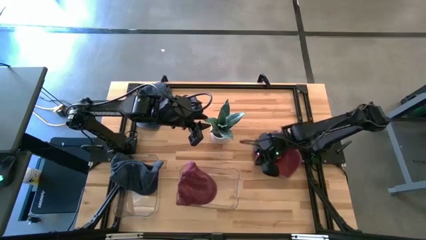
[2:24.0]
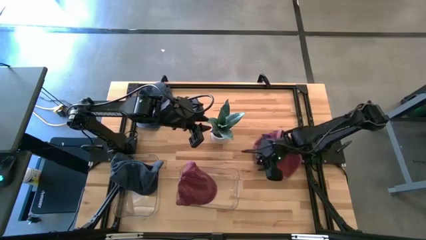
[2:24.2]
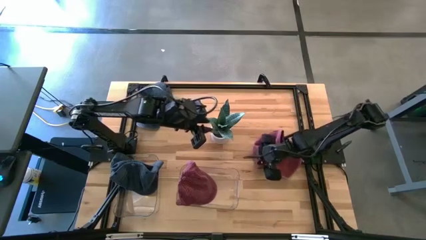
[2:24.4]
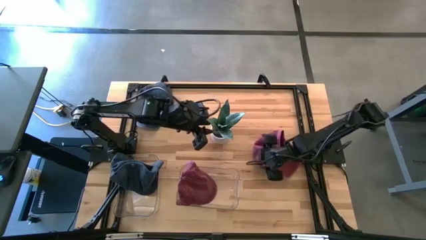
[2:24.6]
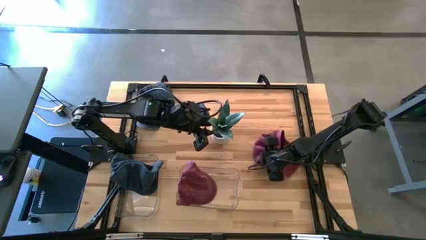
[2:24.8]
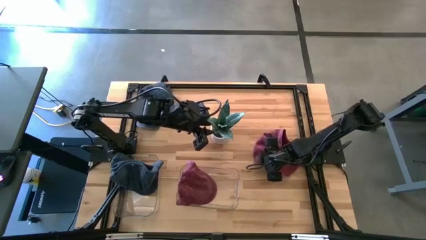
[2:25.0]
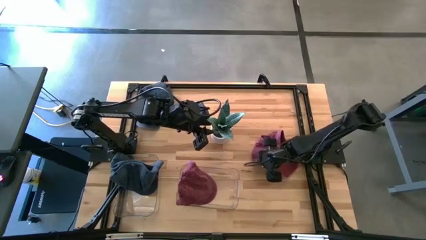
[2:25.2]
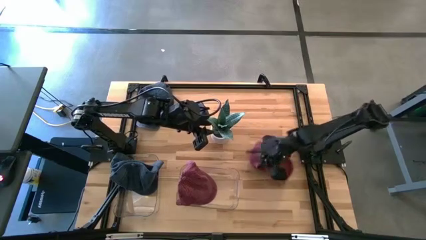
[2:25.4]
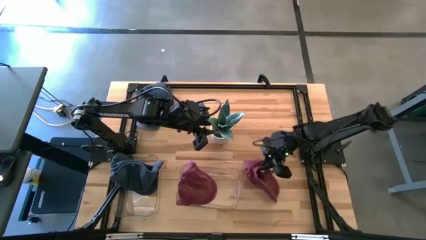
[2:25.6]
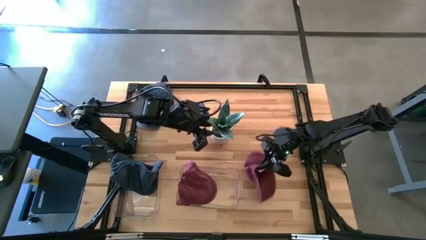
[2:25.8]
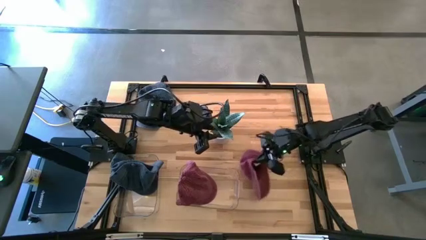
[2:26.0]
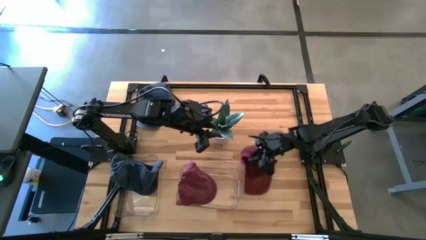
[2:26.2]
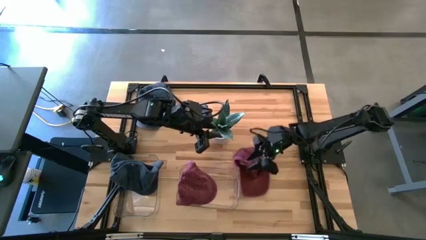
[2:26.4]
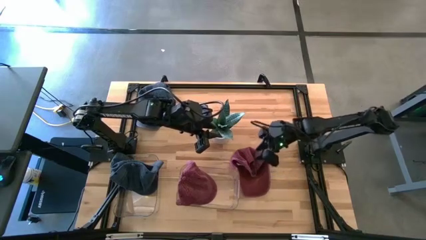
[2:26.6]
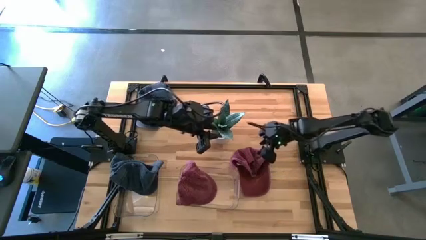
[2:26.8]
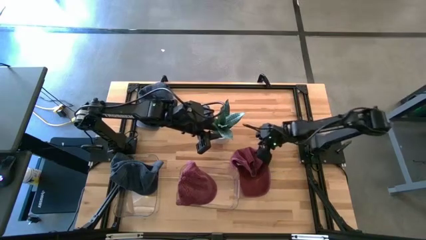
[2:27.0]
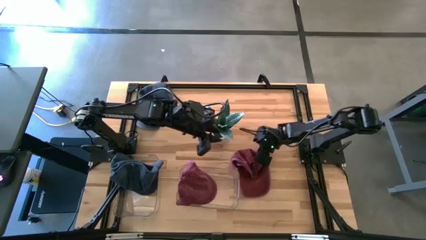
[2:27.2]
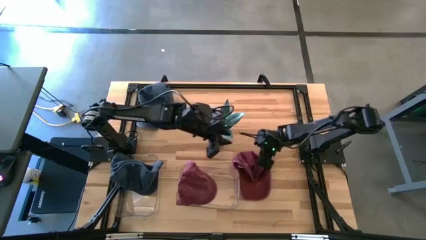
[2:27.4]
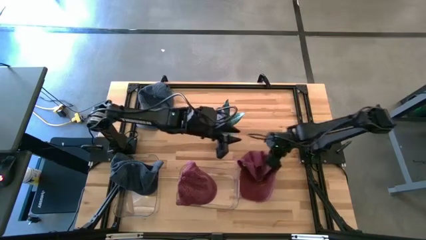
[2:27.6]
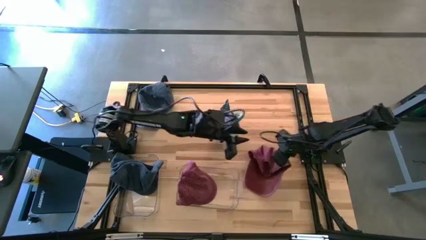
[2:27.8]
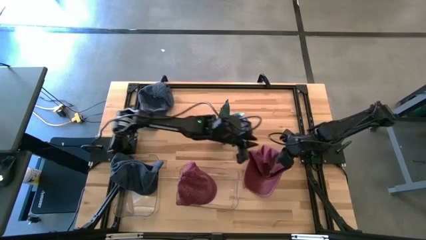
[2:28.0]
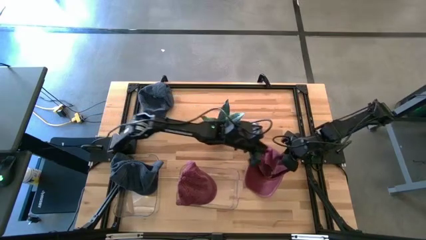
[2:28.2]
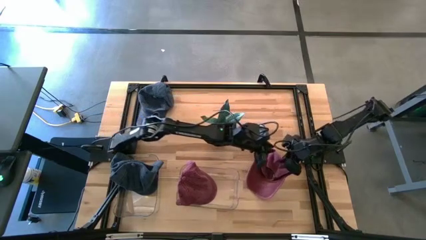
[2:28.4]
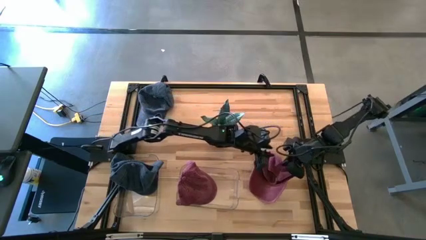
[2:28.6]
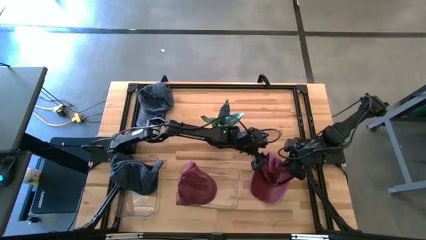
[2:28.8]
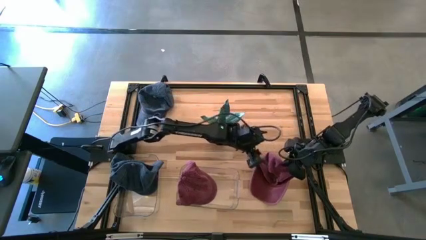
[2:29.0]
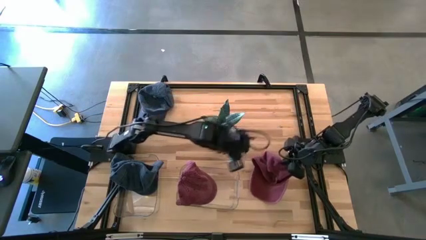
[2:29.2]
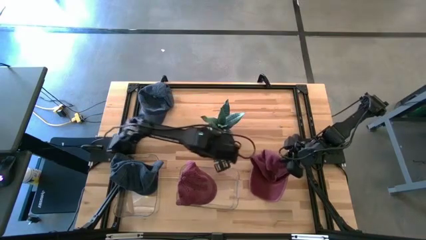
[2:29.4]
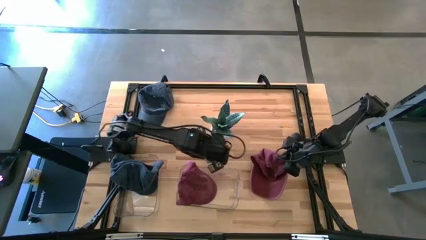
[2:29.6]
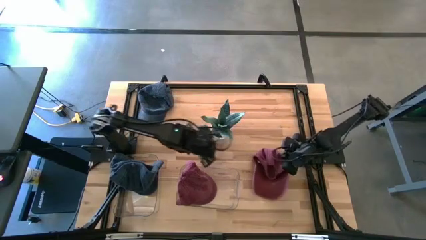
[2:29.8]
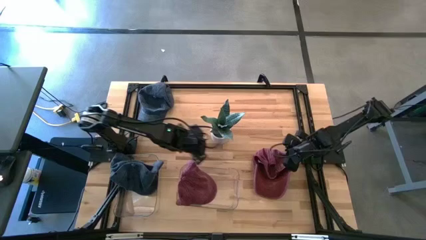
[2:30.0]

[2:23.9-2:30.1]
Task: Pick & Place hat
Put the red cap into the right transparent bin

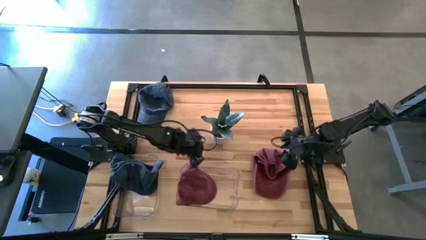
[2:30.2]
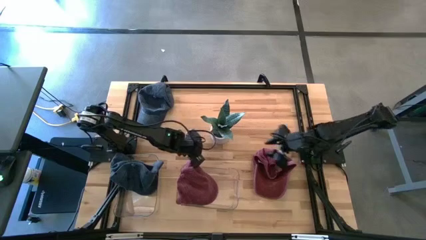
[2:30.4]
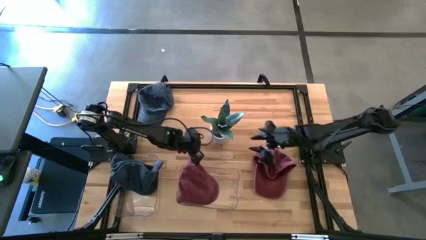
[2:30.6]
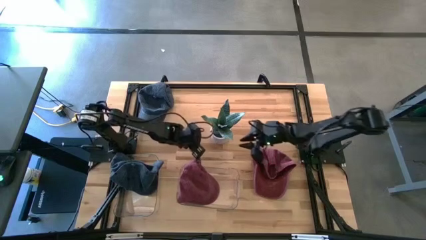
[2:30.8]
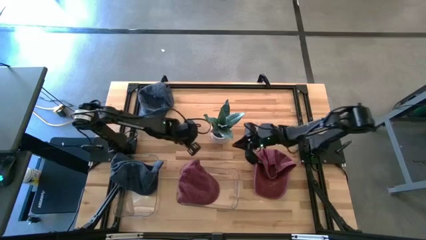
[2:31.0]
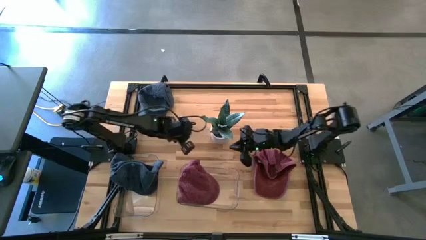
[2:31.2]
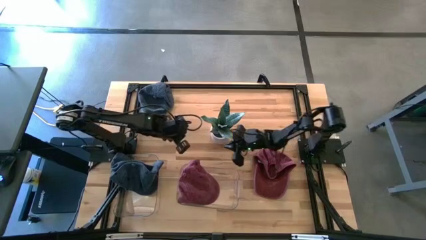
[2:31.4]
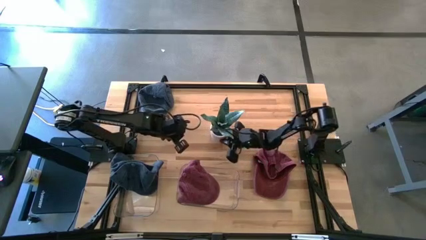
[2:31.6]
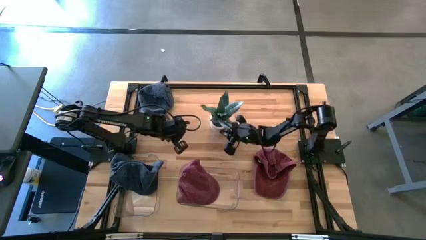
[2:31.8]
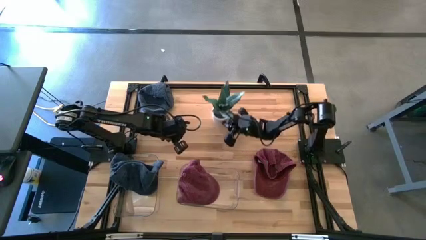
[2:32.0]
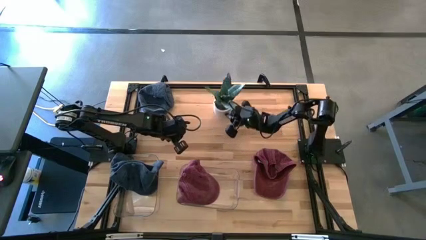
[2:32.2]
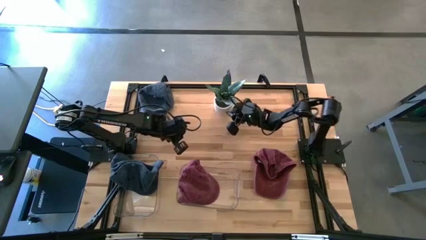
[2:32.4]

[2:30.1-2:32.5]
Adjust the plotted plants on the table
